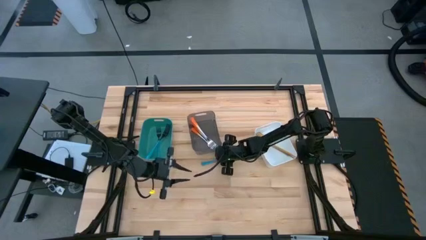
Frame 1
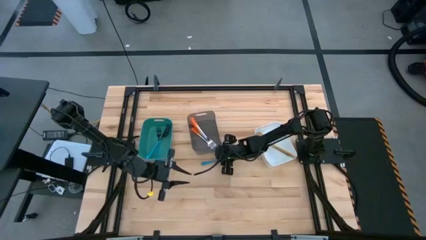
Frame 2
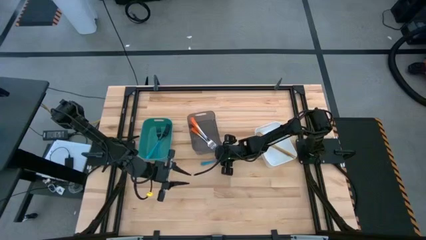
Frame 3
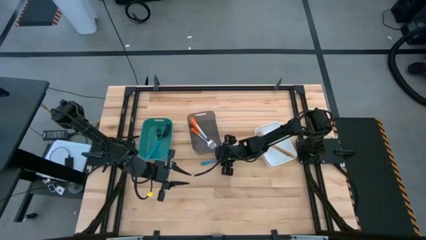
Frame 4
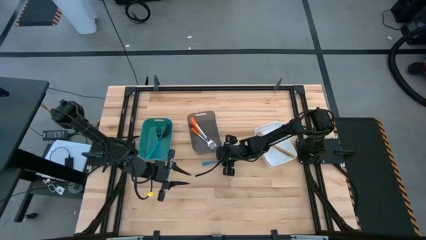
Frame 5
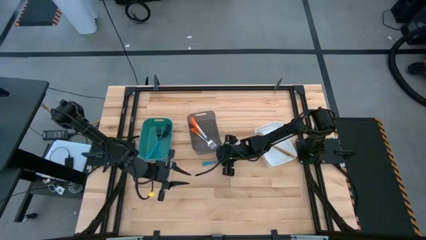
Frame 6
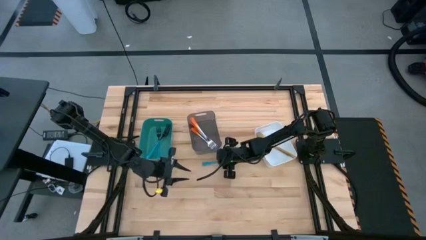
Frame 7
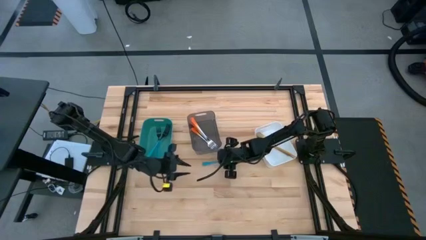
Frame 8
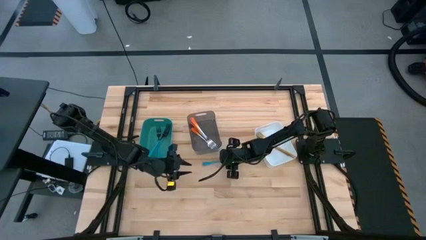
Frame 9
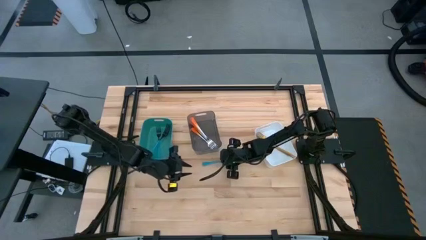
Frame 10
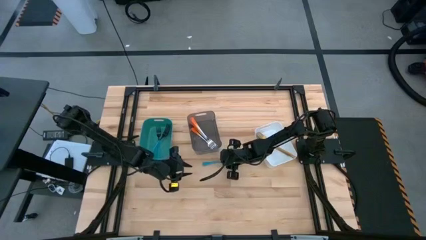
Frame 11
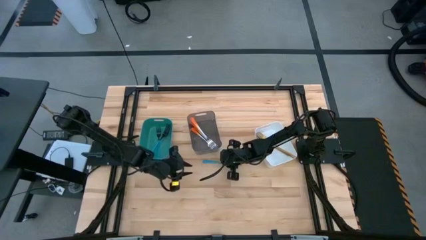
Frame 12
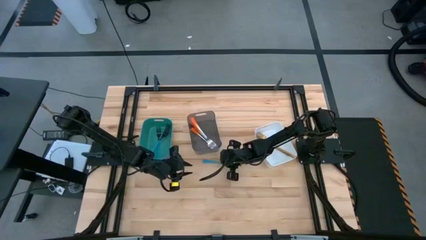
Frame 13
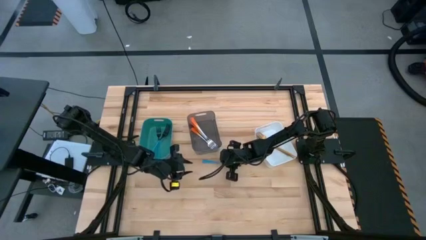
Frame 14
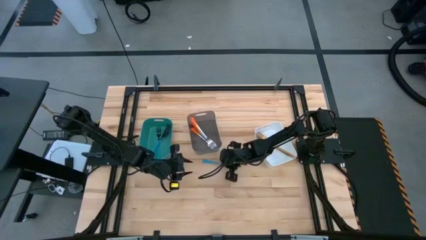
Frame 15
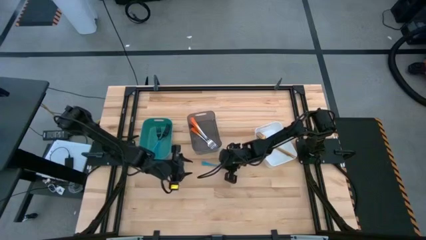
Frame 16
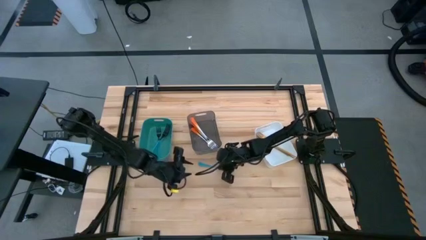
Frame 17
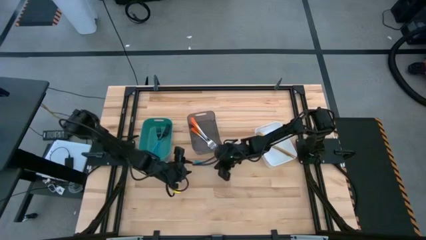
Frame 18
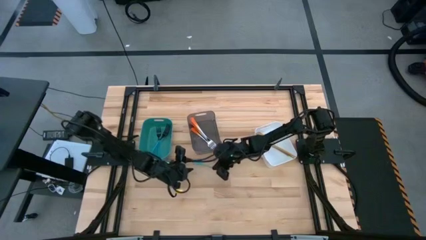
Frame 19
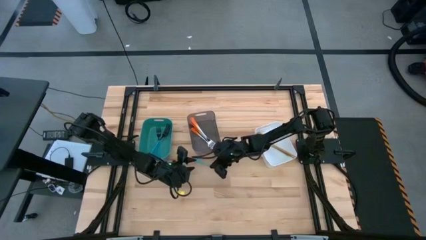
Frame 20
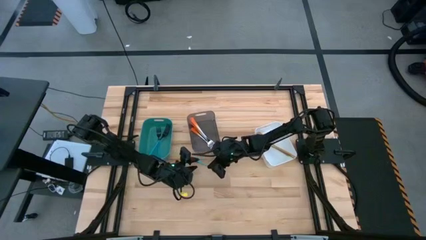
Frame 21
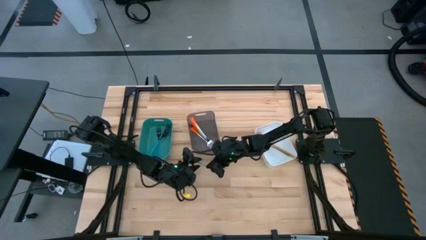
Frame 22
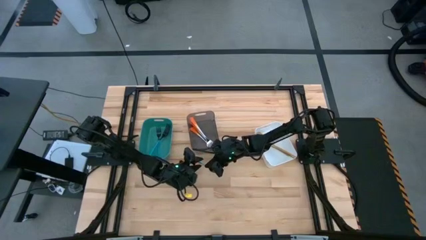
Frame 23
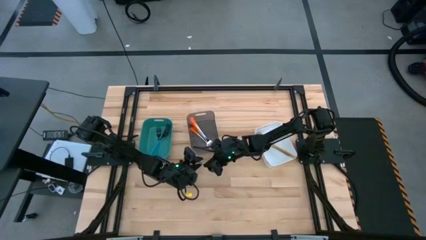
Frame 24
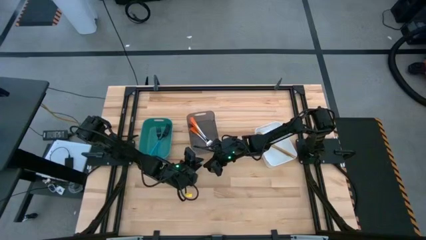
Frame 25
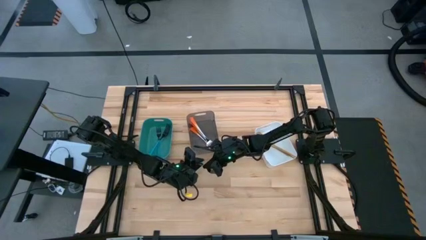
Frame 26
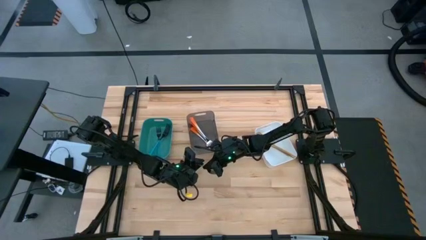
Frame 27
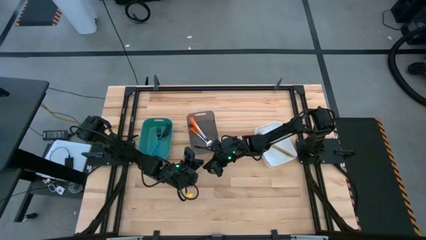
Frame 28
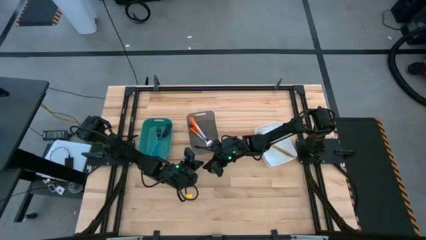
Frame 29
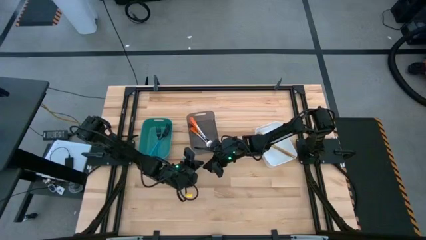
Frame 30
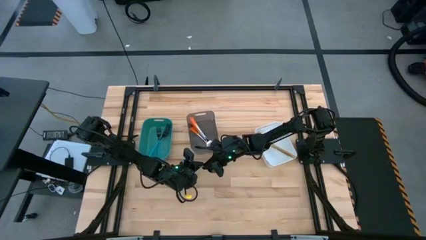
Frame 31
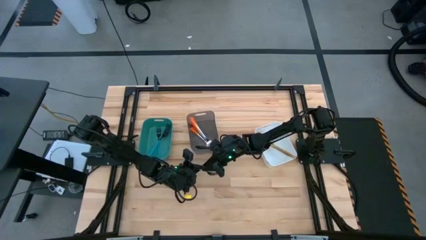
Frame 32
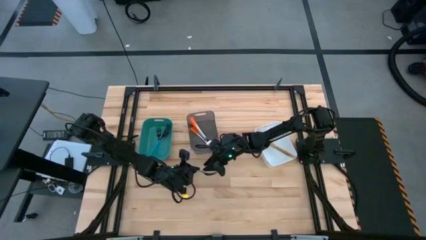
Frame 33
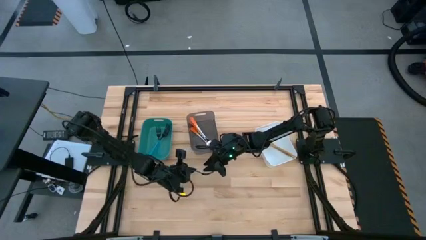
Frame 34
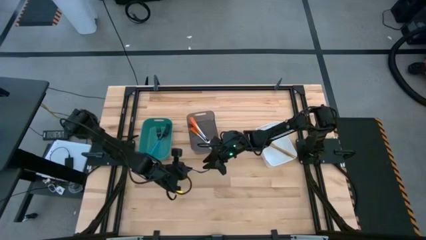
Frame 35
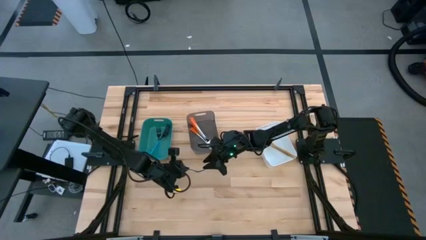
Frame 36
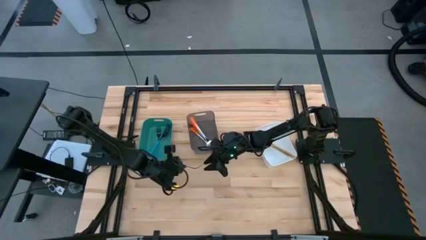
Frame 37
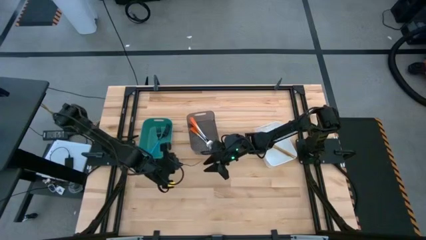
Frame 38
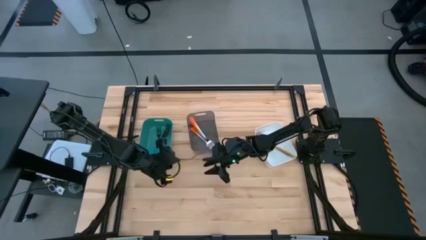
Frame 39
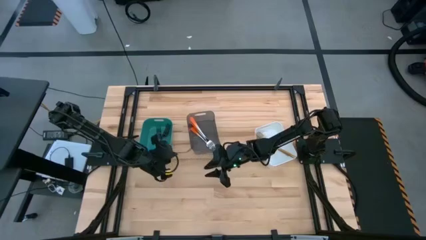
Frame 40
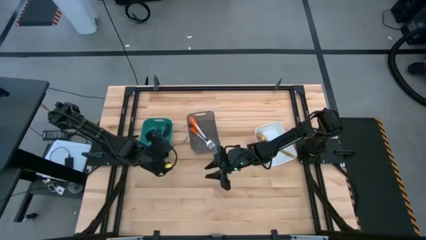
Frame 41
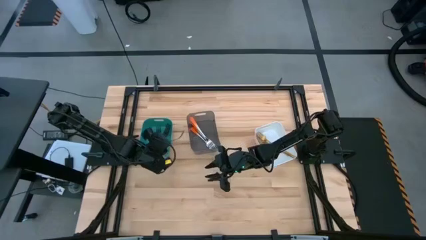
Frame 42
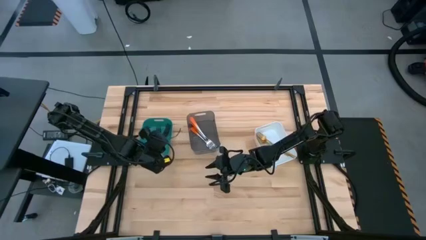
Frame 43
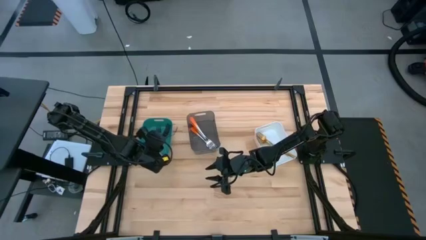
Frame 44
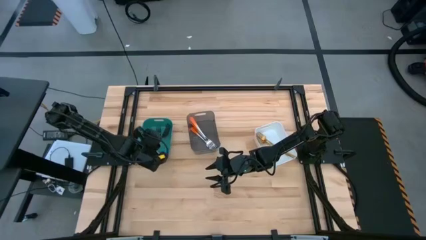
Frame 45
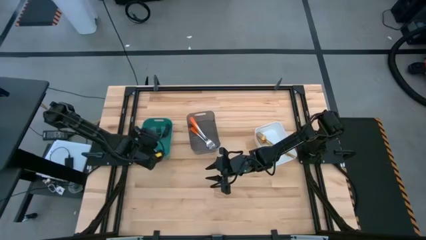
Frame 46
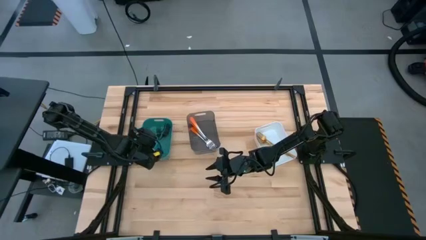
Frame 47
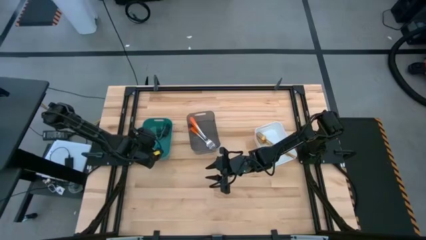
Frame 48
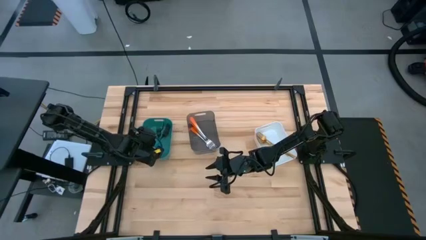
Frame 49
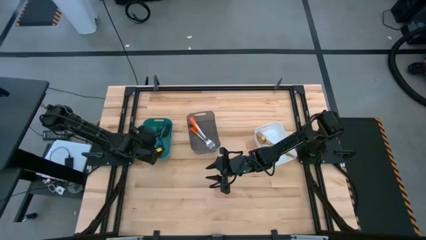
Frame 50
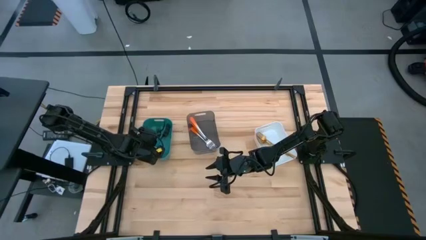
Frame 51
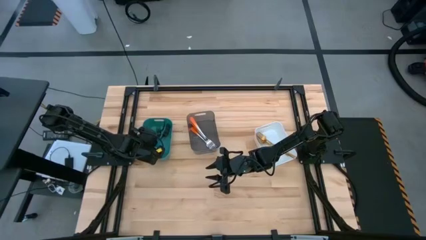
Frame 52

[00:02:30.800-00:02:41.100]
Task: Sort silverware by color (type)
Put the blue fork into the green bin

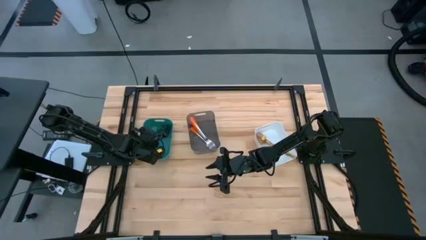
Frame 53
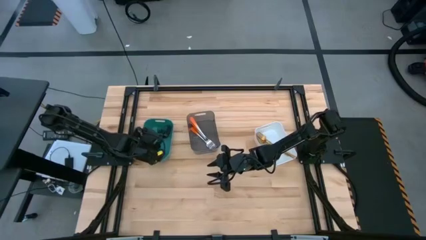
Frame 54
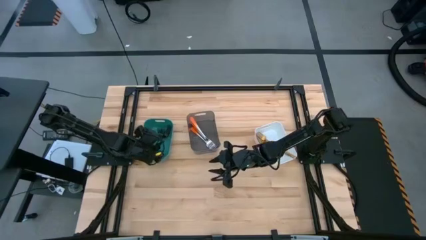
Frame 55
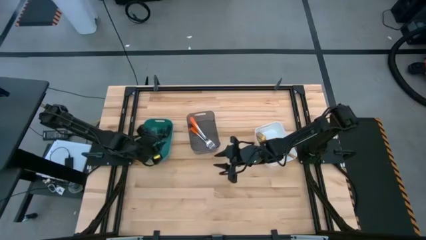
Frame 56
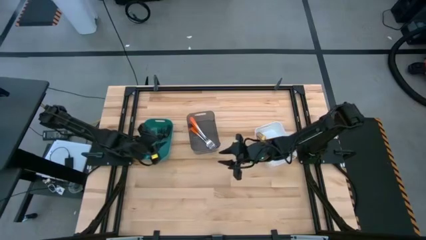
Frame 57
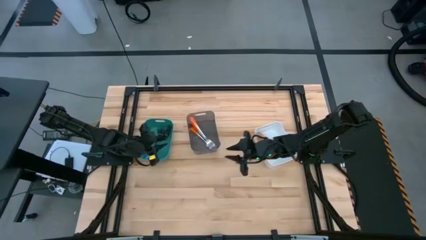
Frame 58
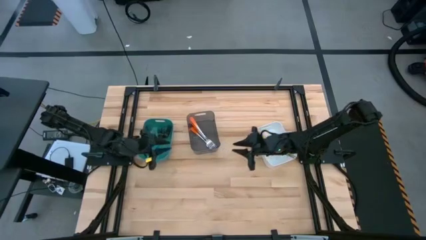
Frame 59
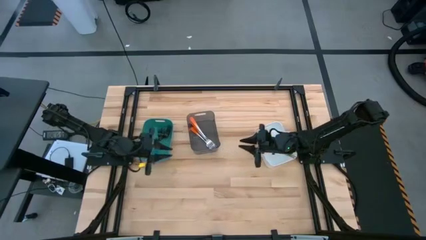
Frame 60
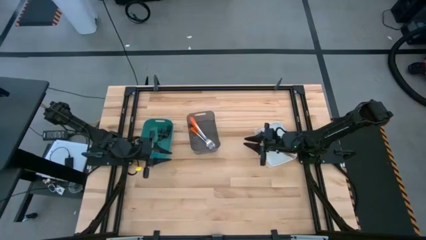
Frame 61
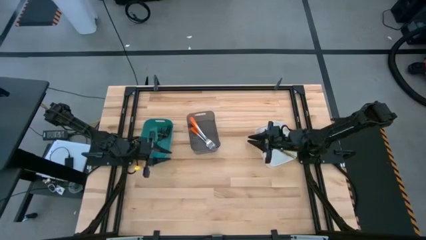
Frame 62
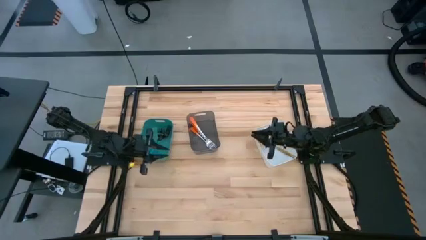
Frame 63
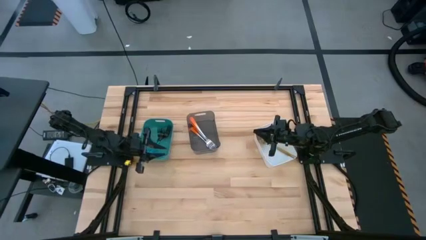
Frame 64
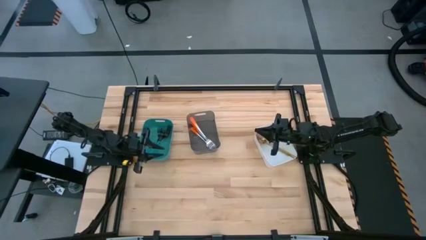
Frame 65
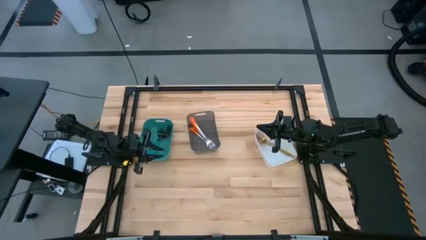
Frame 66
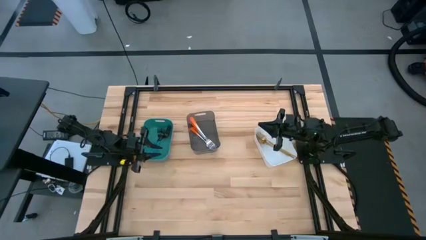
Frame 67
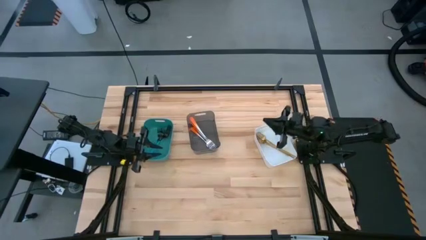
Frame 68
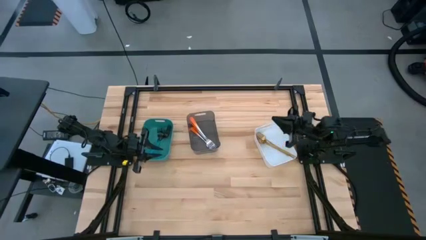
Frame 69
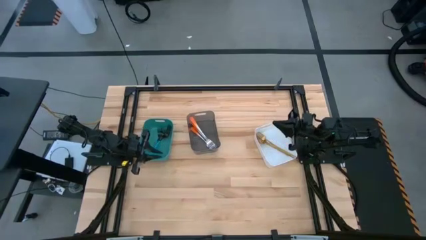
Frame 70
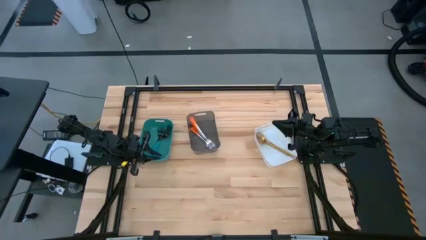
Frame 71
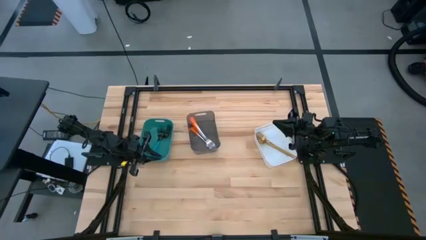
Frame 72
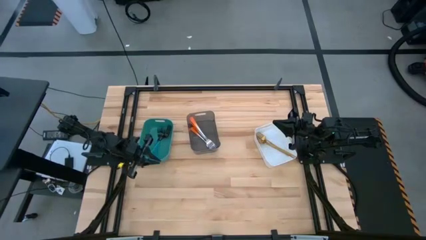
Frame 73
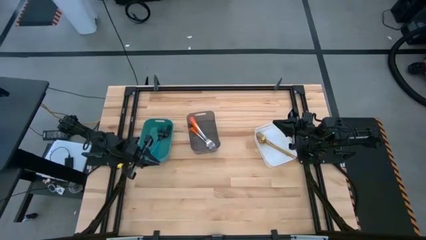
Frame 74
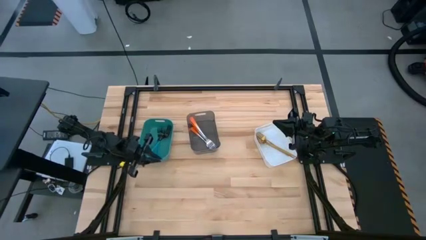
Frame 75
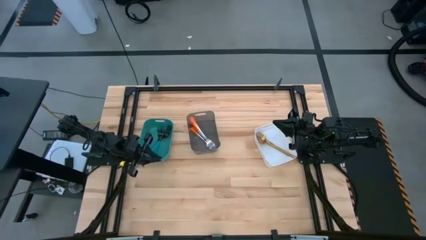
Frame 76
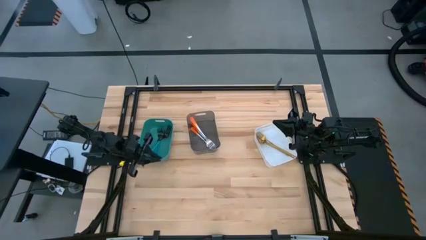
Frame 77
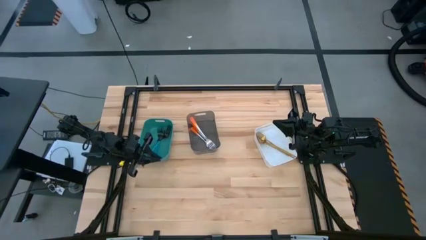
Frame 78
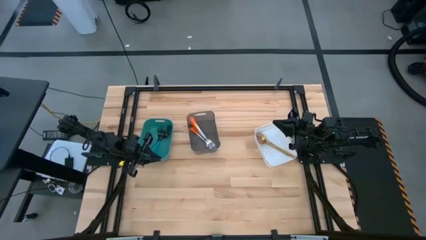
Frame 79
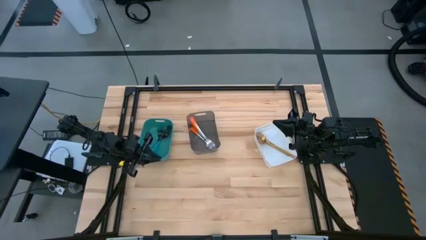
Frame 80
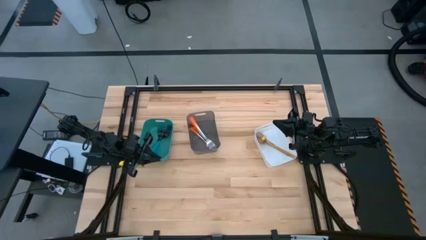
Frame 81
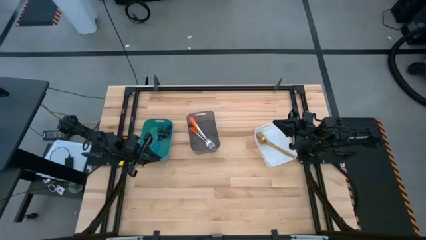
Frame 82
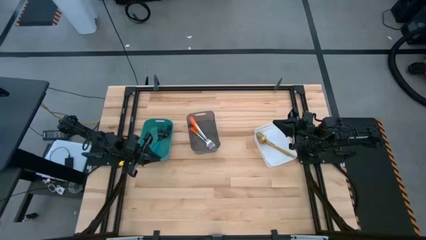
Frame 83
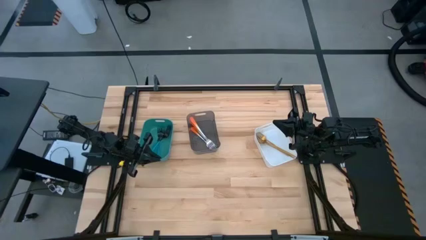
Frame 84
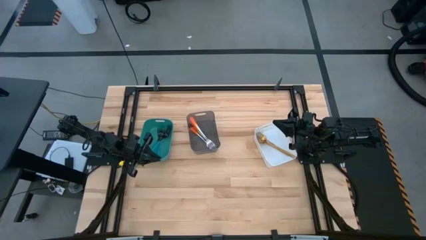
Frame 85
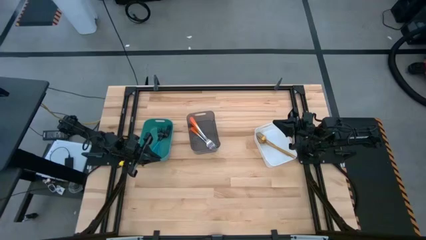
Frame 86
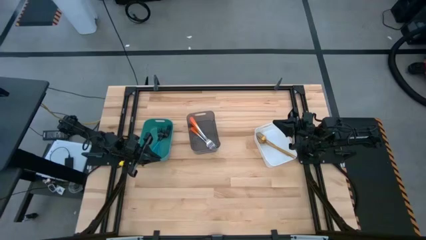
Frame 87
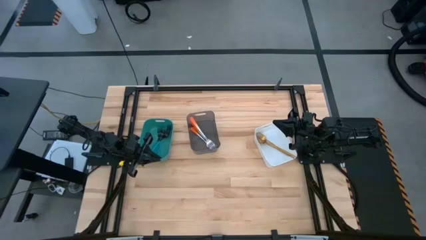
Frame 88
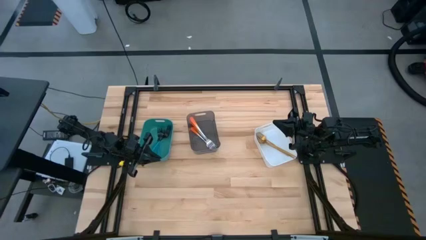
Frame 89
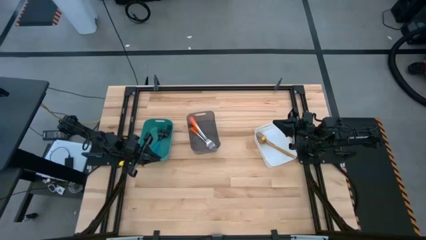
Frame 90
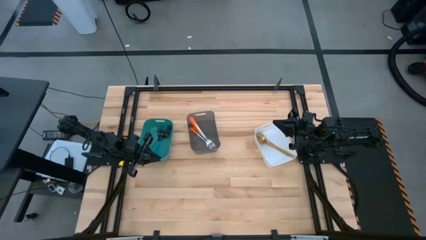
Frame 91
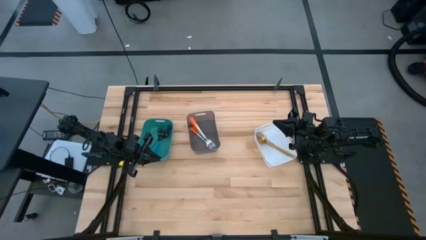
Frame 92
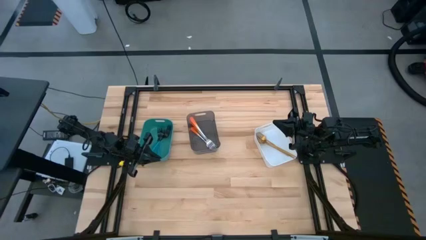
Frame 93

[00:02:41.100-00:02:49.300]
Return To Home Position
